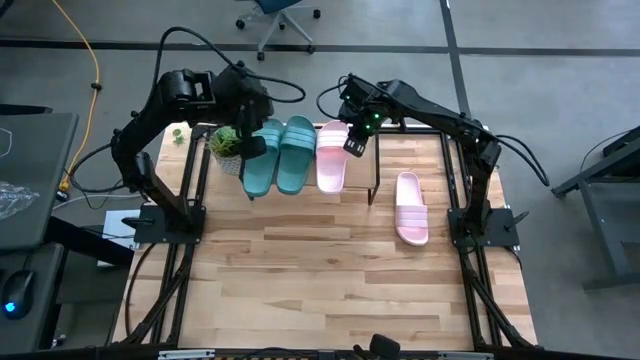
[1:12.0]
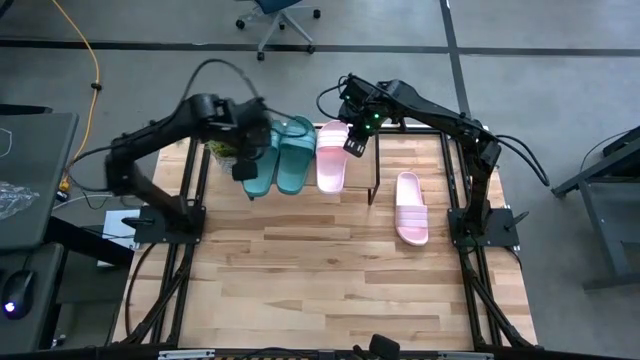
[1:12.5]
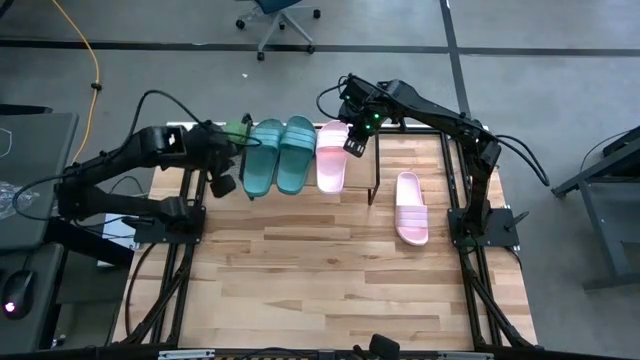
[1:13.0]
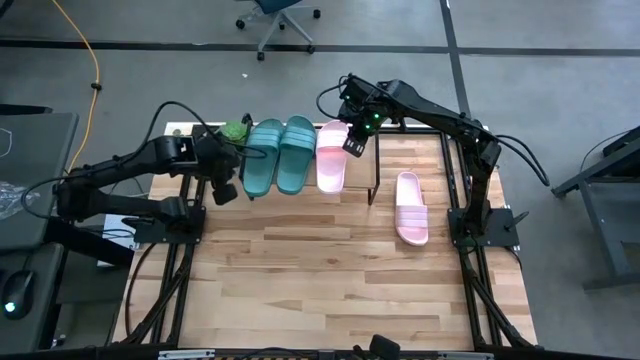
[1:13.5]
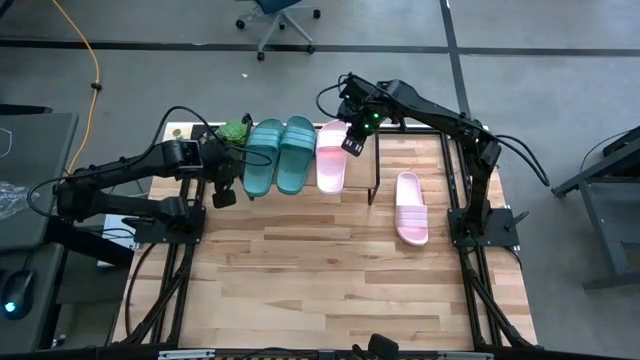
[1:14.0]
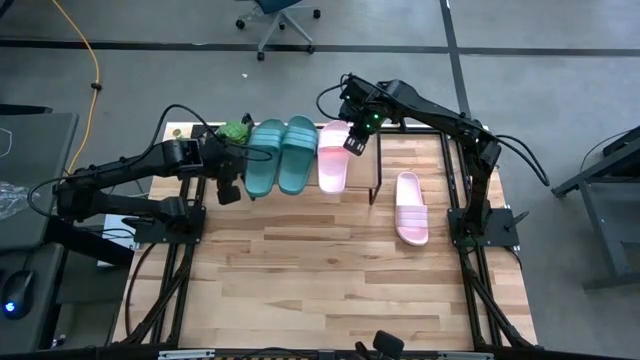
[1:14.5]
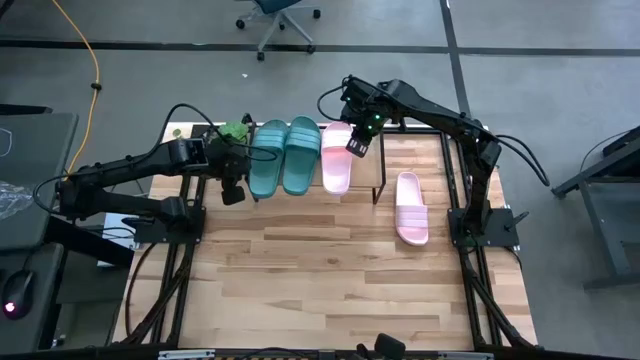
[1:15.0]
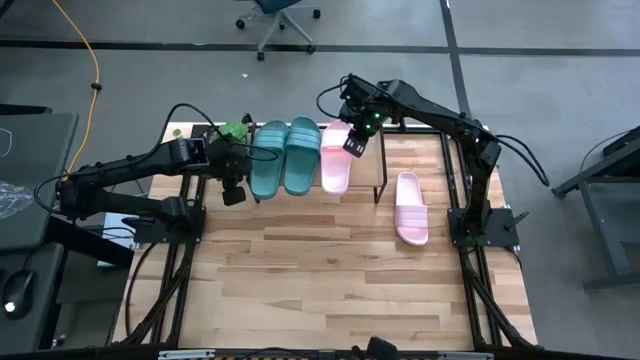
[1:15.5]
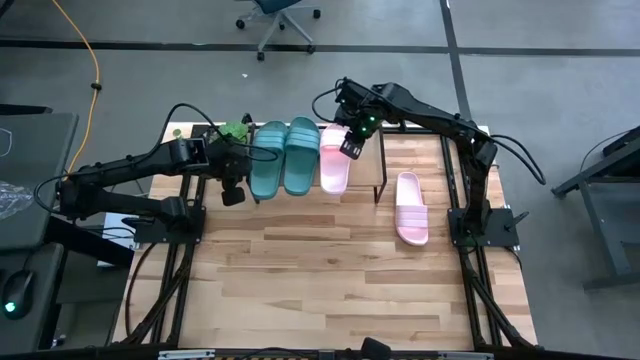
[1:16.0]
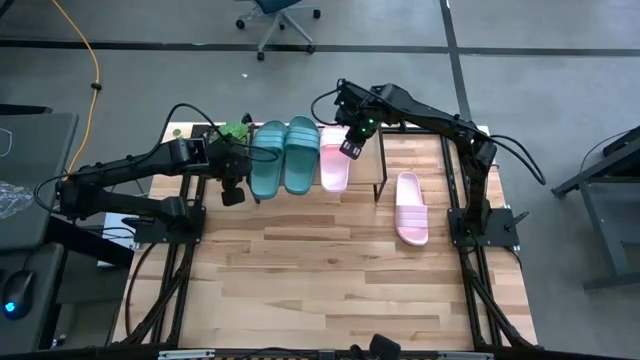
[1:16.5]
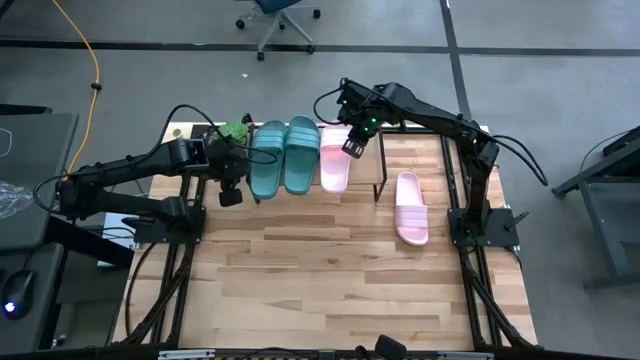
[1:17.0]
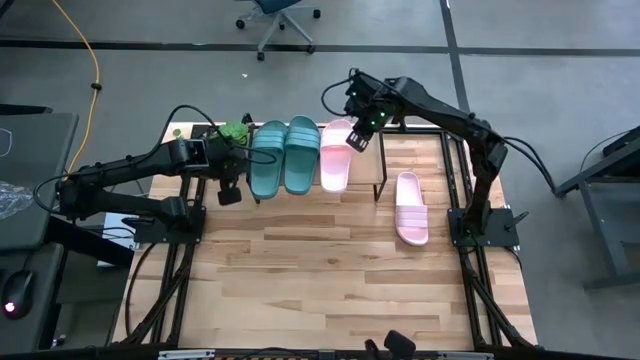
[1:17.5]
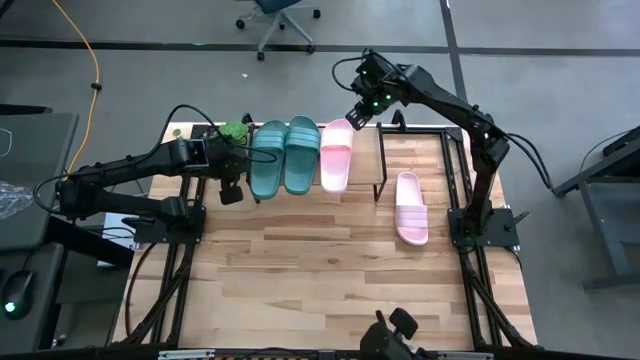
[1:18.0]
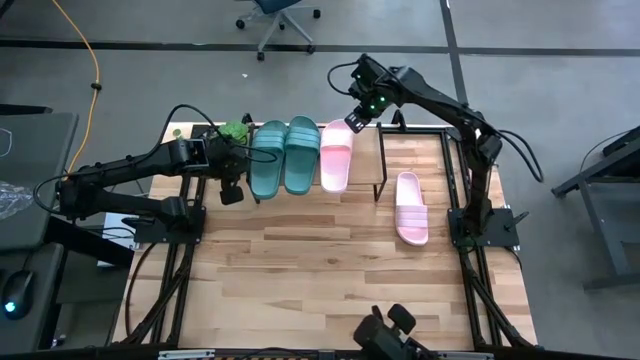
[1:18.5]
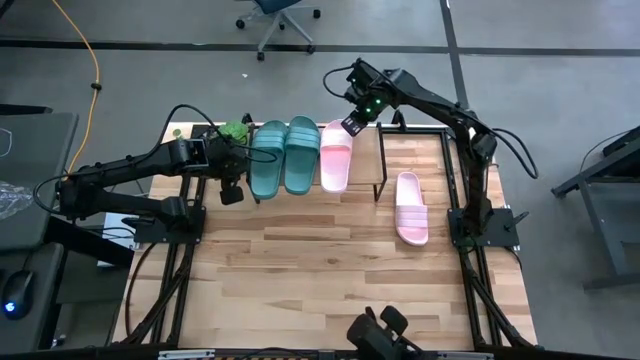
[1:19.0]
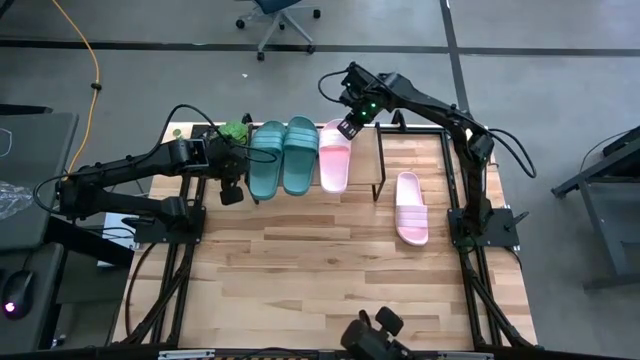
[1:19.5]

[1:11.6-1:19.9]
Task: Pick and place slides into the shelf
Adjust the shelf

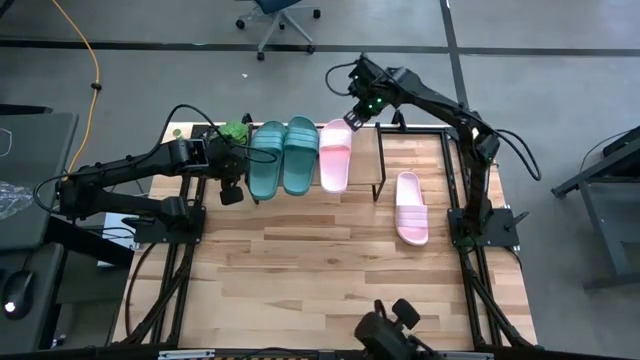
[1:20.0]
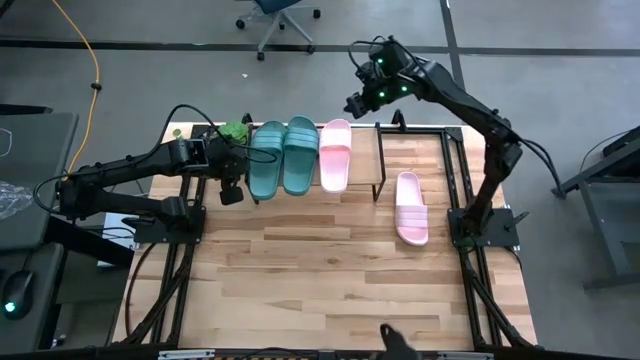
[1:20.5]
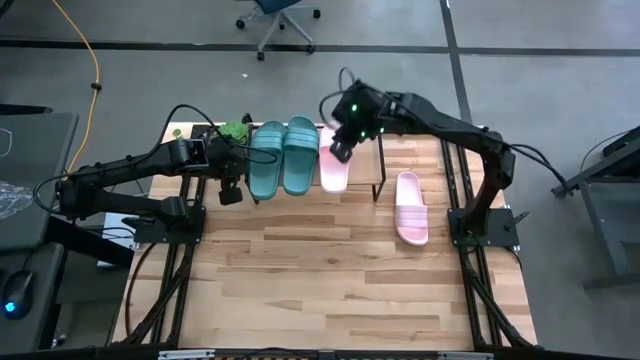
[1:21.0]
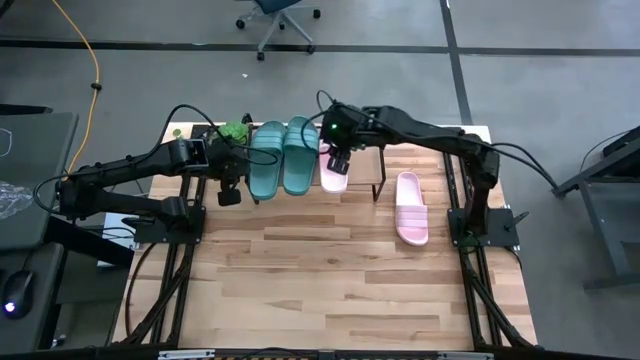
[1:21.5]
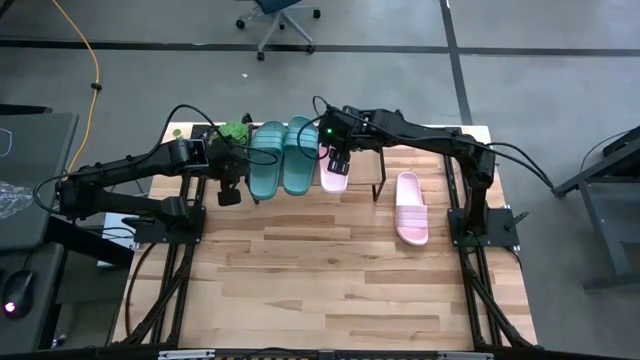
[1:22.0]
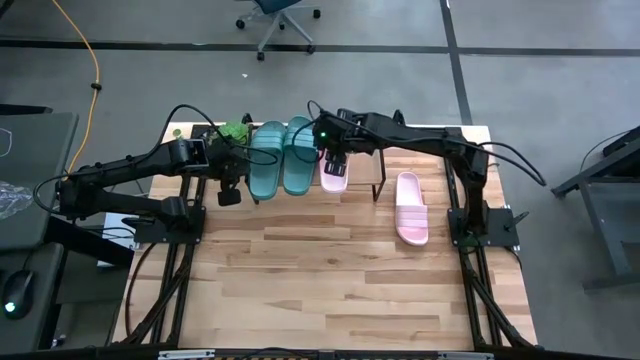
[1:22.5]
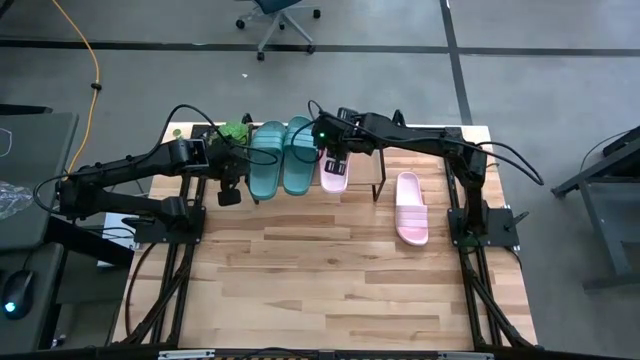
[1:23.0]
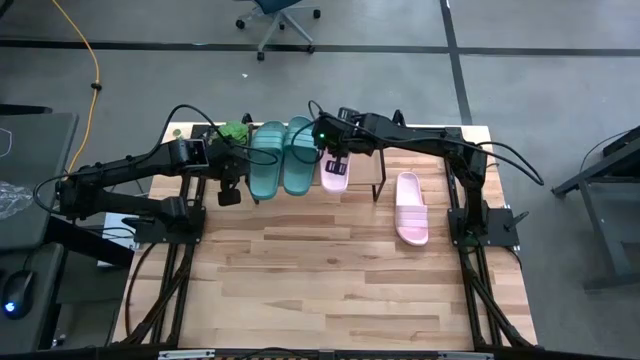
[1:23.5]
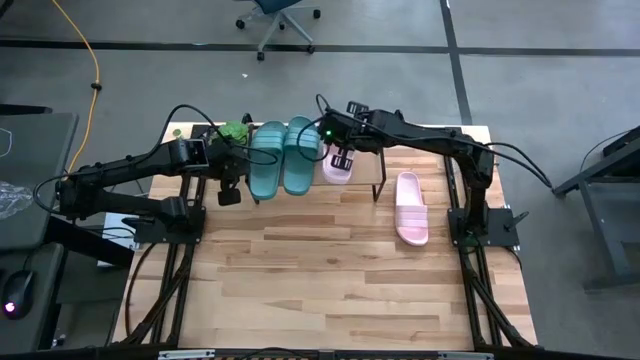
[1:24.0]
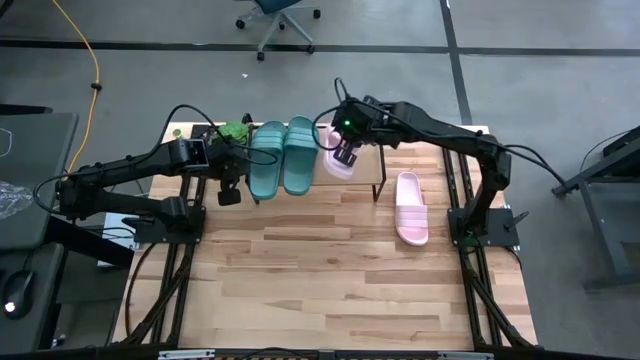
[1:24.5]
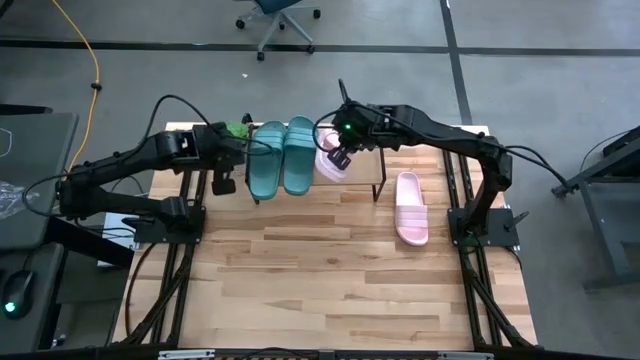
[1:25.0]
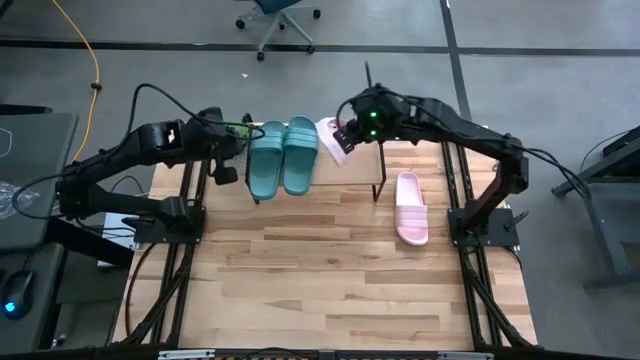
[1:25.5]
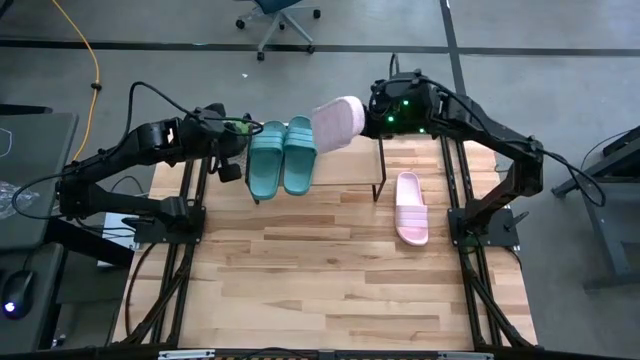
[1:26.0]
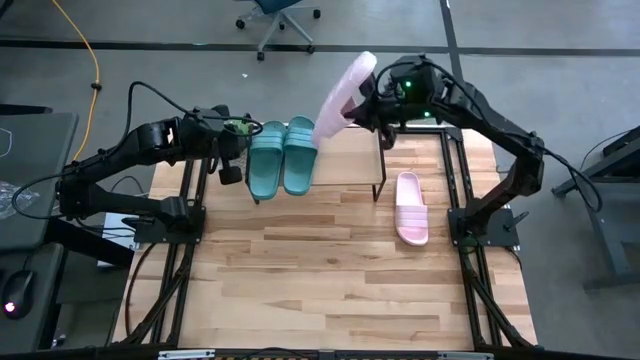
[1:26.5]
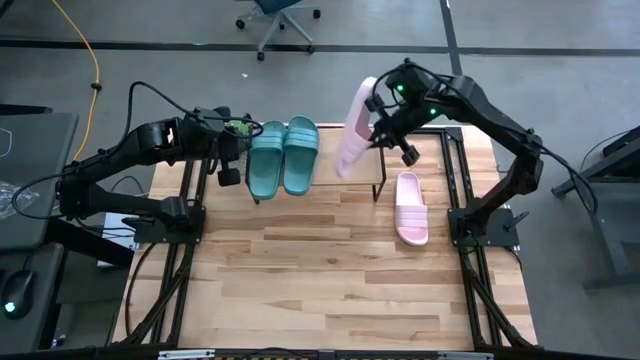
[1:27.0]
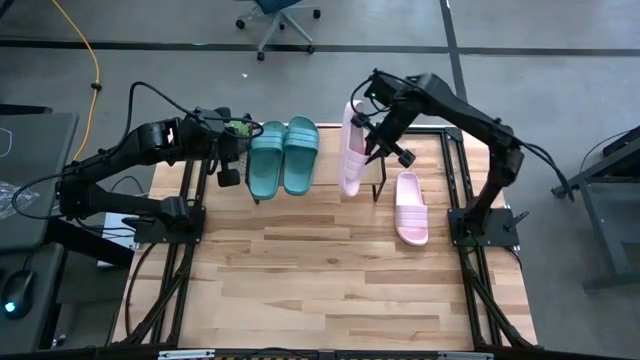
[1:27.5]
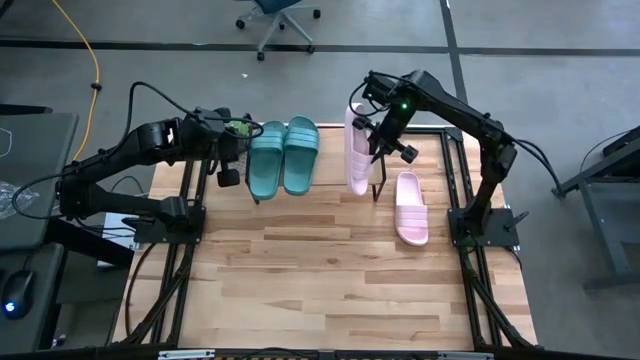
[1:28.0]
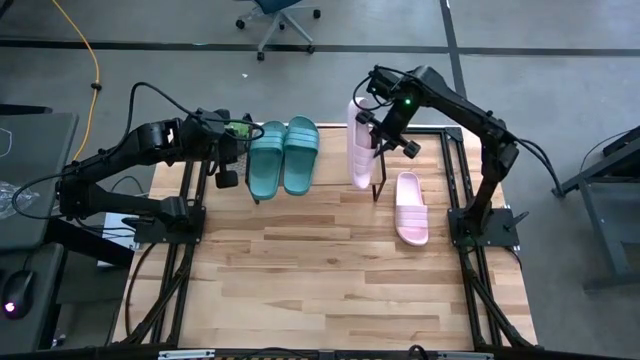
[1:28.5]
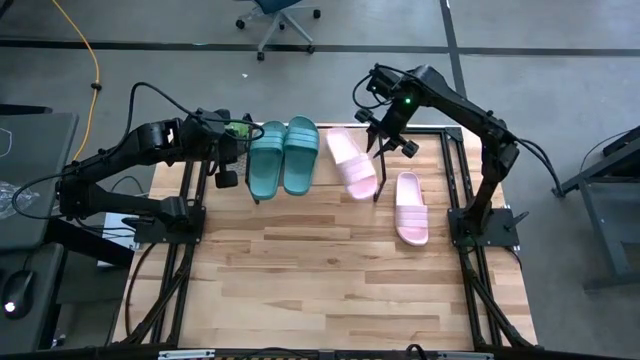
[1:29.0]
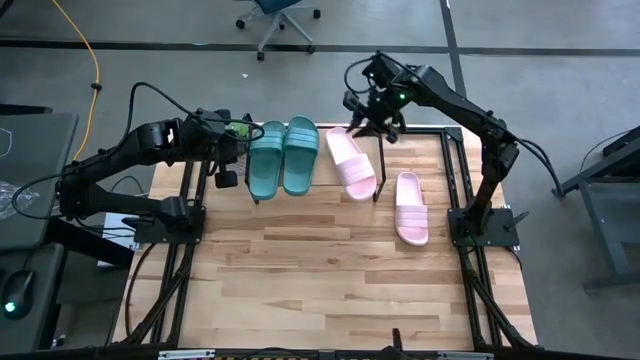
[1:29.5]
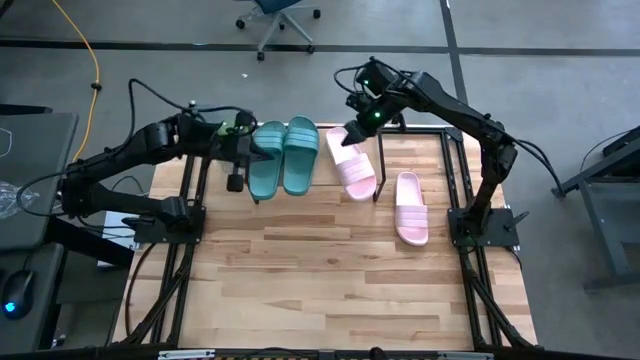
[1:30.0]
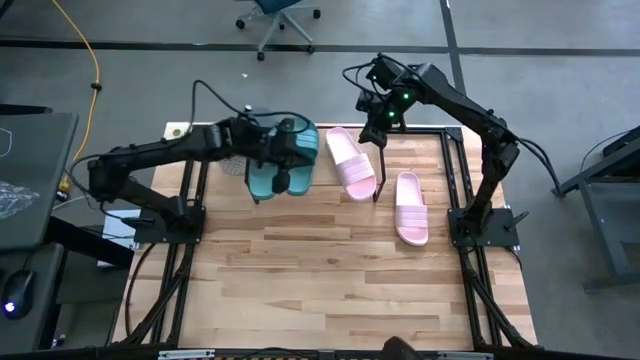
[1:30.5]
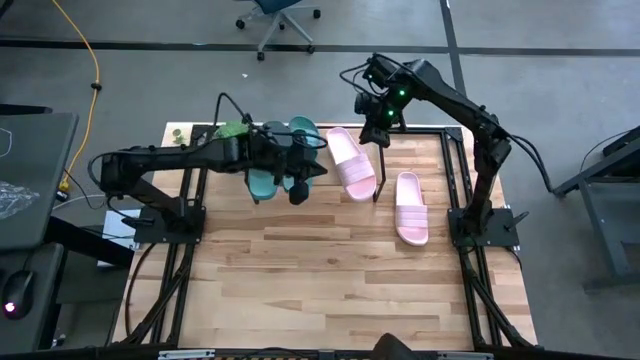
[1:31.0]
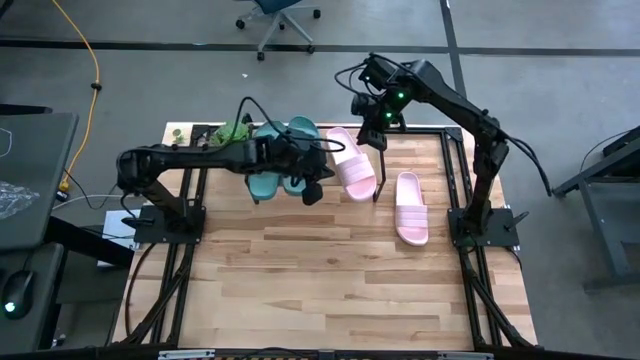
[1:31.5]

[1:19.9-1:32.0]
Adjust the pink slide on the shelf
